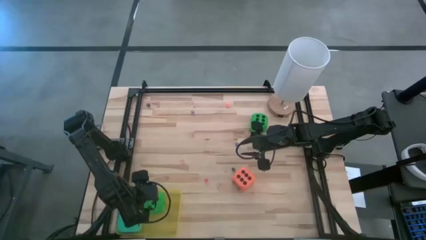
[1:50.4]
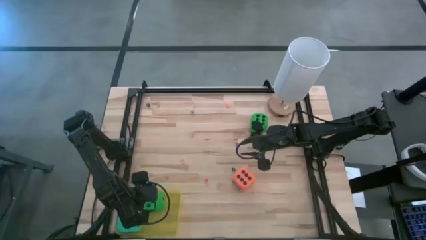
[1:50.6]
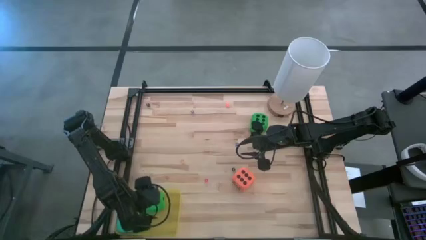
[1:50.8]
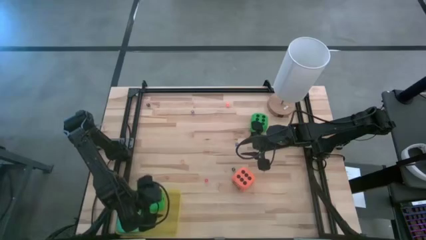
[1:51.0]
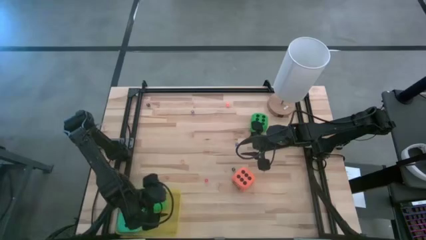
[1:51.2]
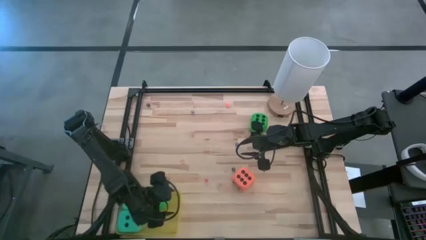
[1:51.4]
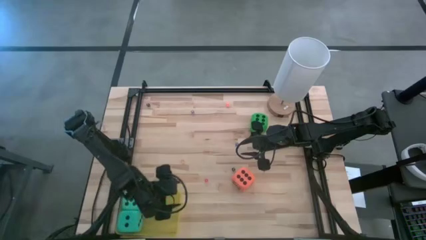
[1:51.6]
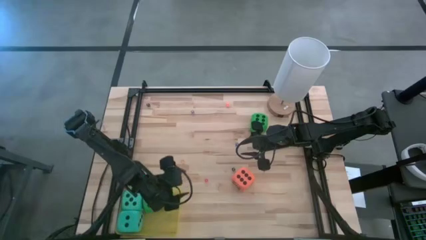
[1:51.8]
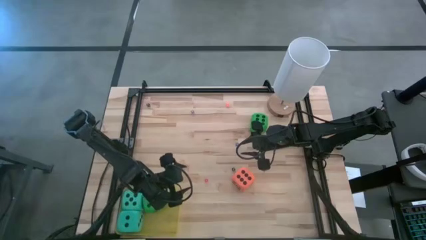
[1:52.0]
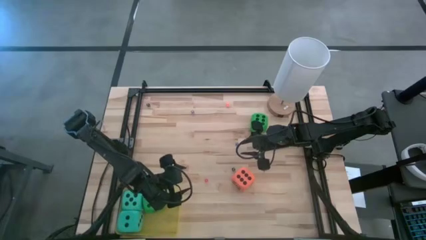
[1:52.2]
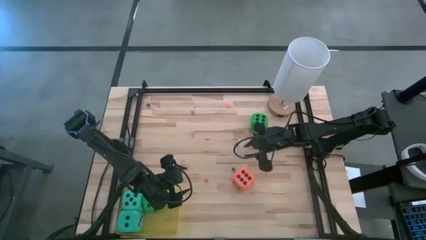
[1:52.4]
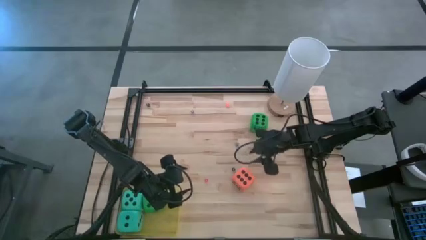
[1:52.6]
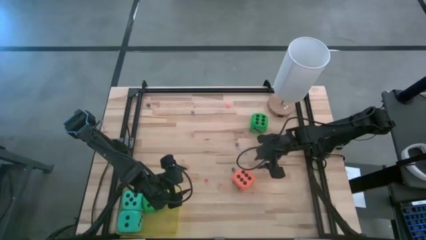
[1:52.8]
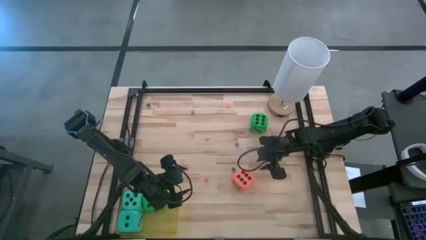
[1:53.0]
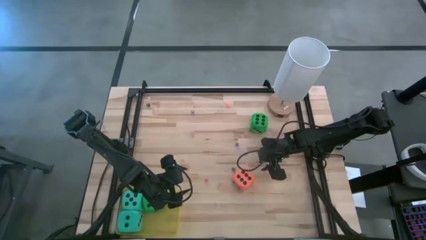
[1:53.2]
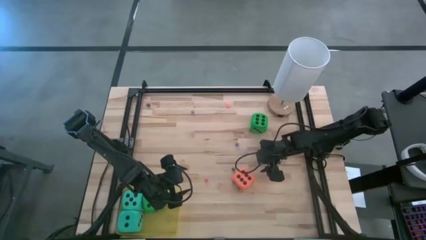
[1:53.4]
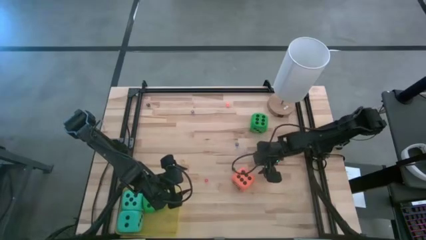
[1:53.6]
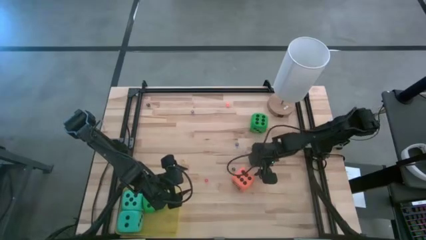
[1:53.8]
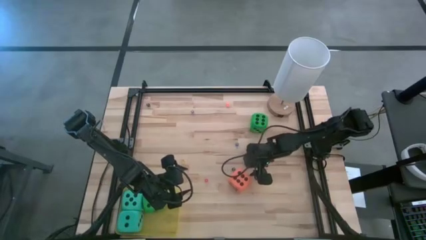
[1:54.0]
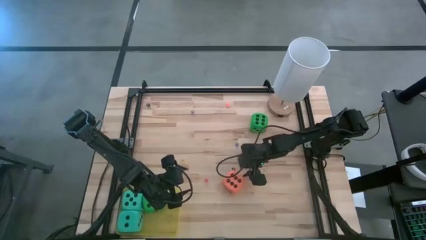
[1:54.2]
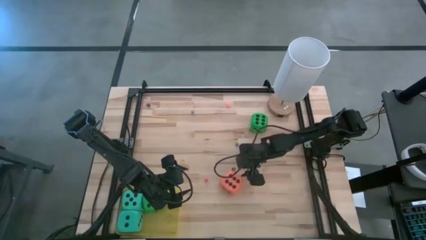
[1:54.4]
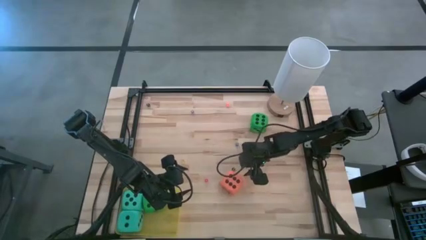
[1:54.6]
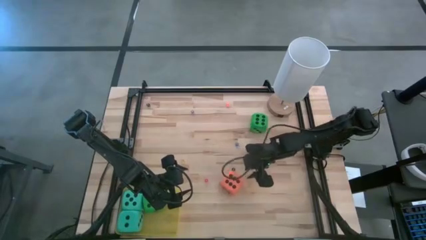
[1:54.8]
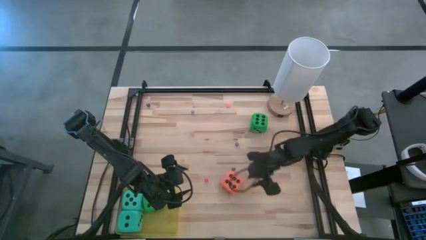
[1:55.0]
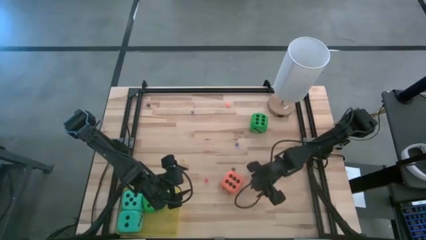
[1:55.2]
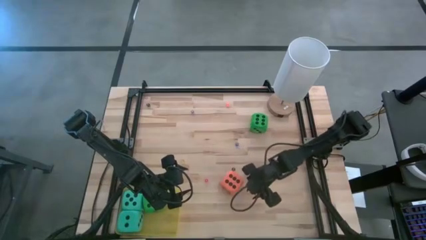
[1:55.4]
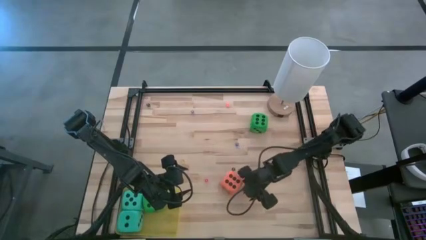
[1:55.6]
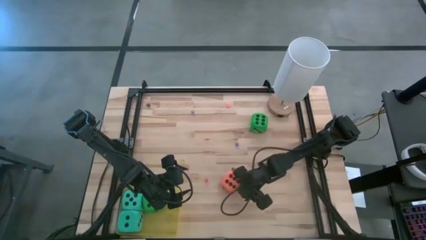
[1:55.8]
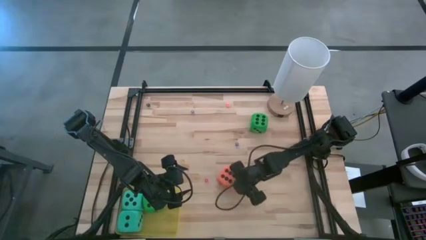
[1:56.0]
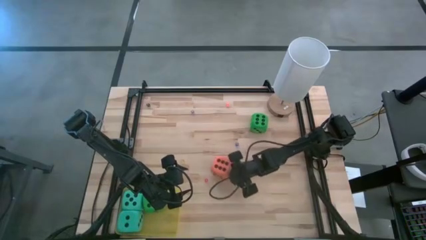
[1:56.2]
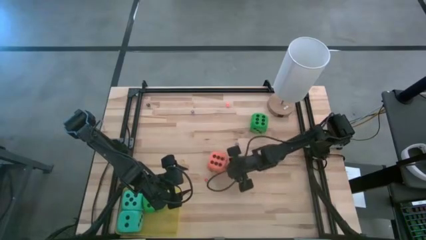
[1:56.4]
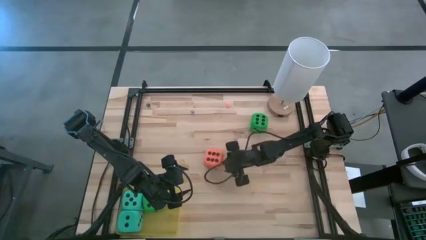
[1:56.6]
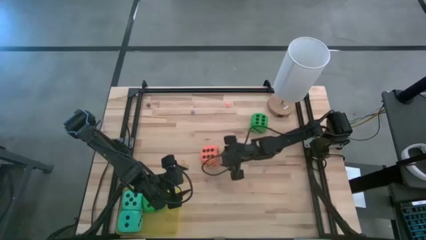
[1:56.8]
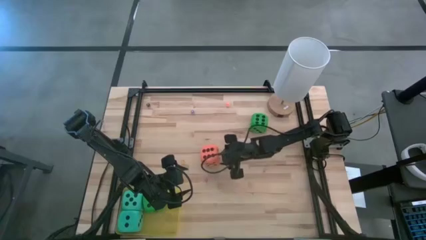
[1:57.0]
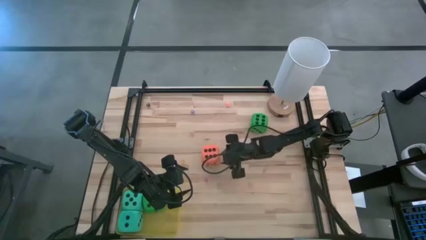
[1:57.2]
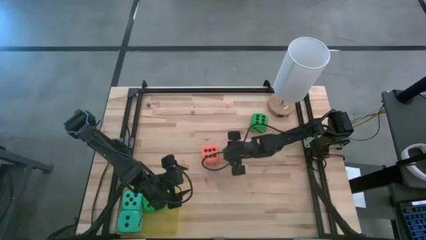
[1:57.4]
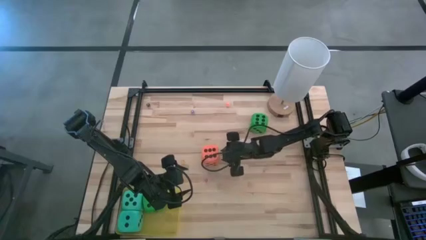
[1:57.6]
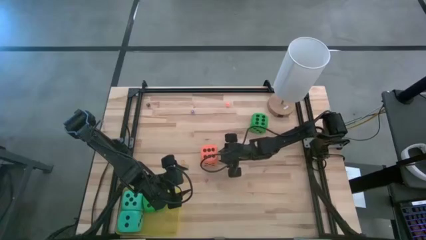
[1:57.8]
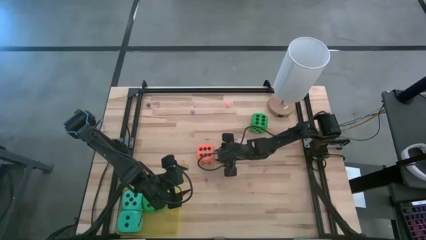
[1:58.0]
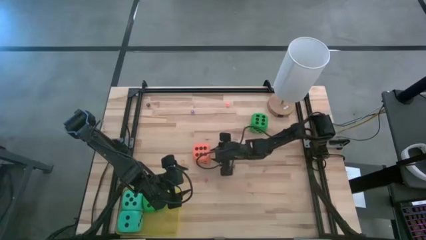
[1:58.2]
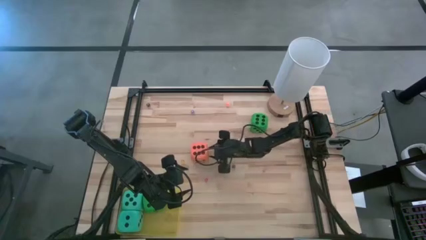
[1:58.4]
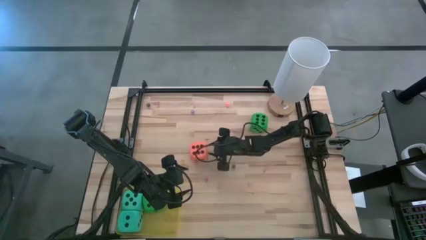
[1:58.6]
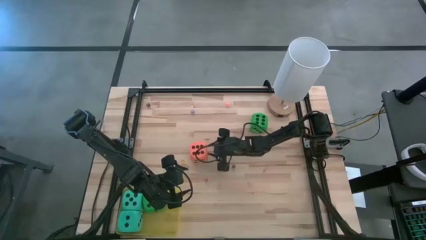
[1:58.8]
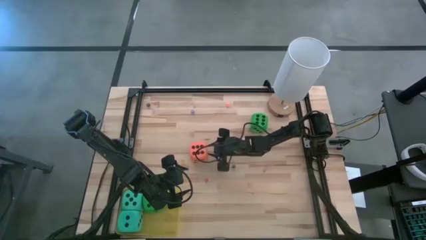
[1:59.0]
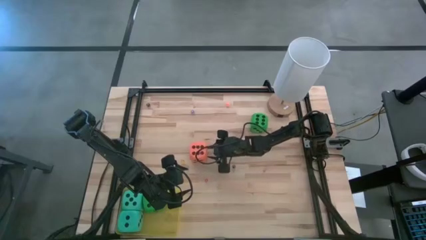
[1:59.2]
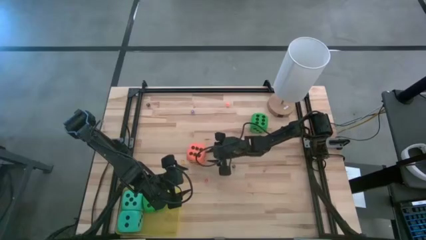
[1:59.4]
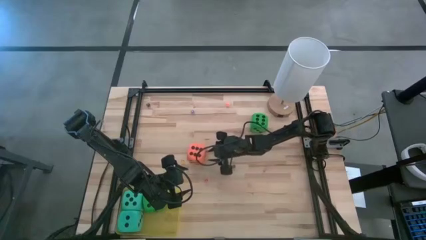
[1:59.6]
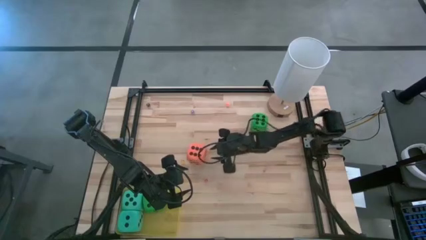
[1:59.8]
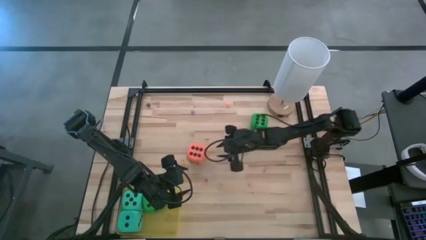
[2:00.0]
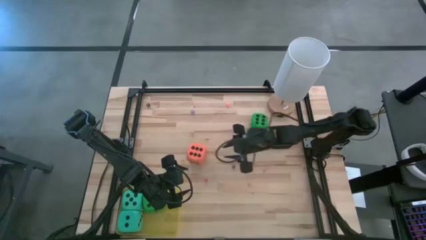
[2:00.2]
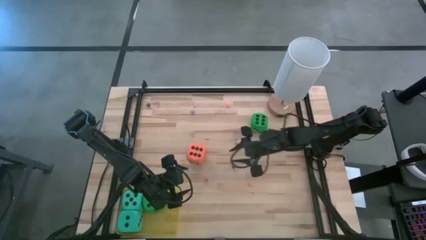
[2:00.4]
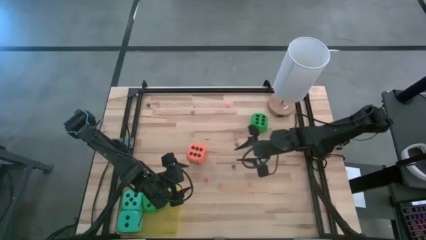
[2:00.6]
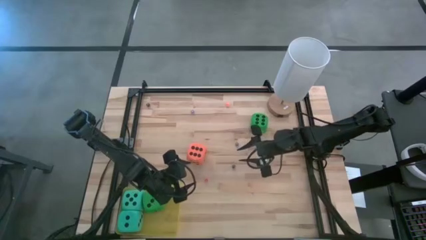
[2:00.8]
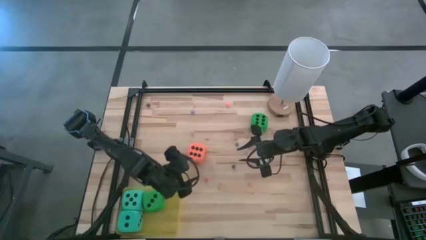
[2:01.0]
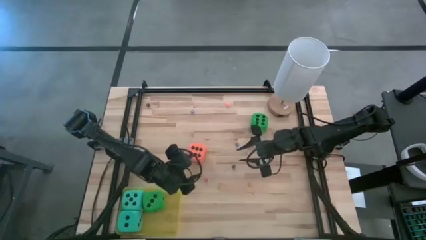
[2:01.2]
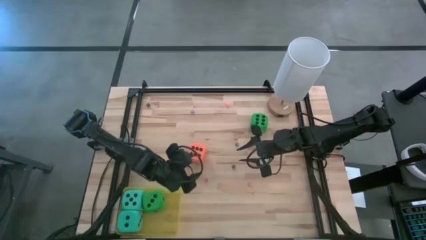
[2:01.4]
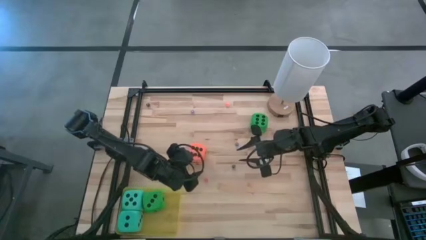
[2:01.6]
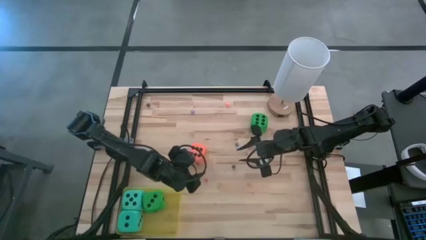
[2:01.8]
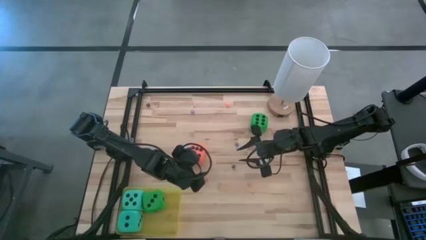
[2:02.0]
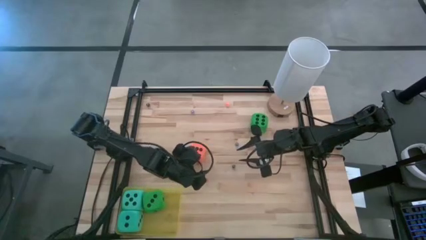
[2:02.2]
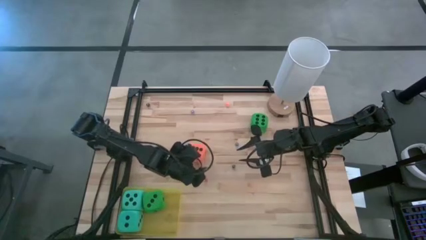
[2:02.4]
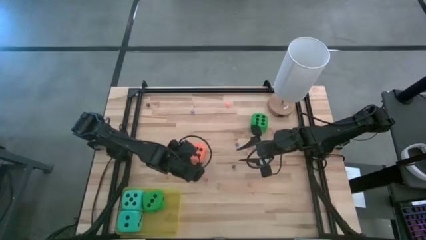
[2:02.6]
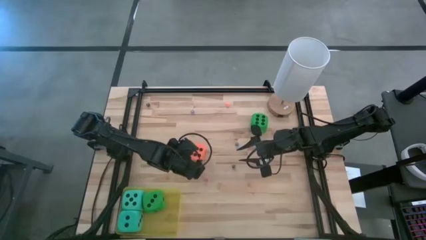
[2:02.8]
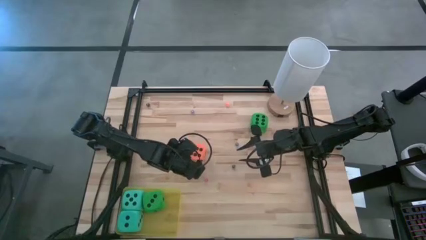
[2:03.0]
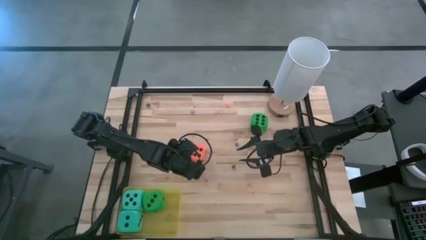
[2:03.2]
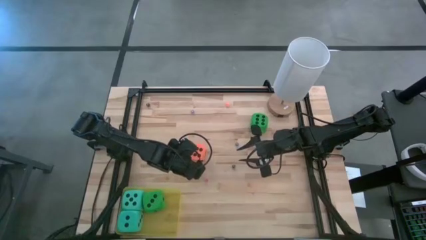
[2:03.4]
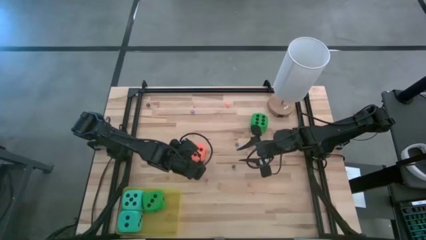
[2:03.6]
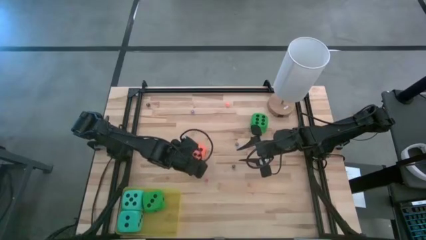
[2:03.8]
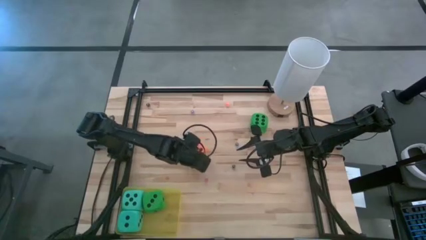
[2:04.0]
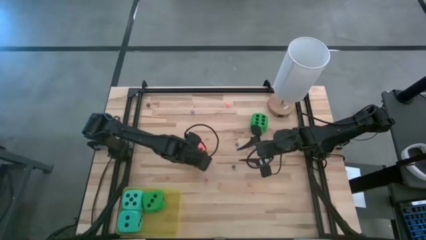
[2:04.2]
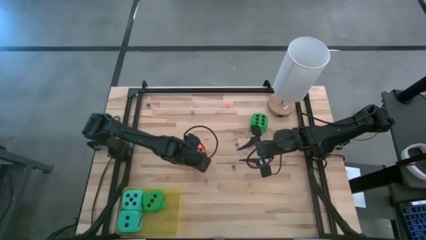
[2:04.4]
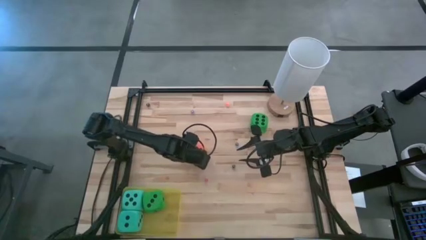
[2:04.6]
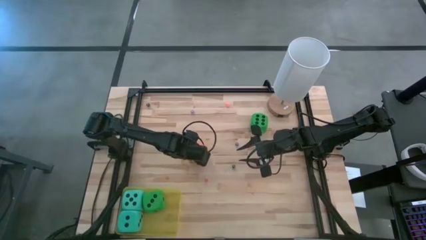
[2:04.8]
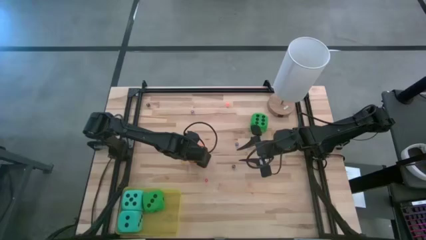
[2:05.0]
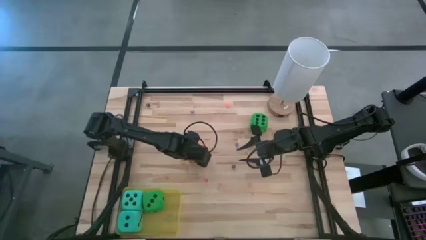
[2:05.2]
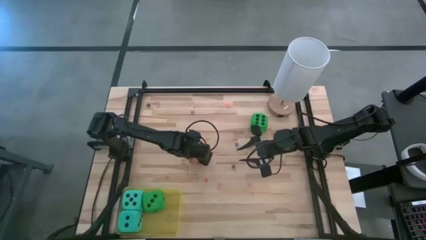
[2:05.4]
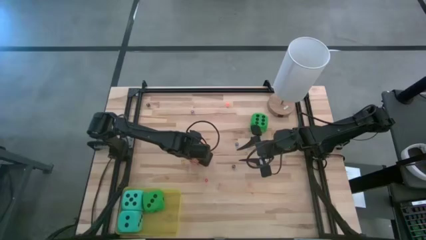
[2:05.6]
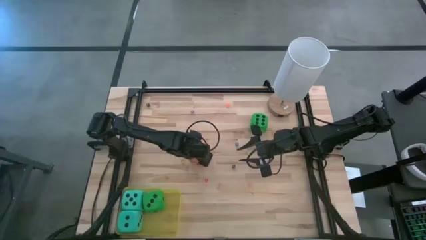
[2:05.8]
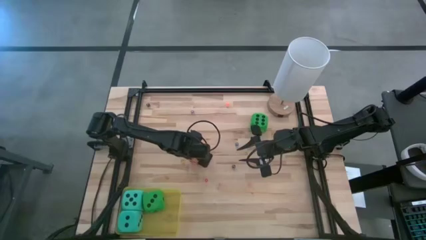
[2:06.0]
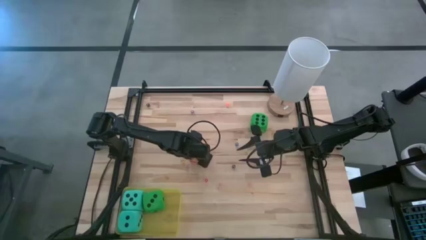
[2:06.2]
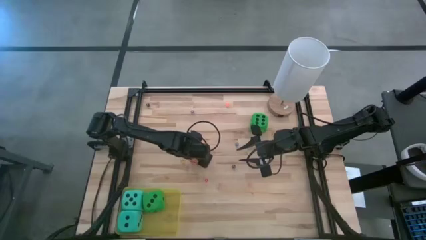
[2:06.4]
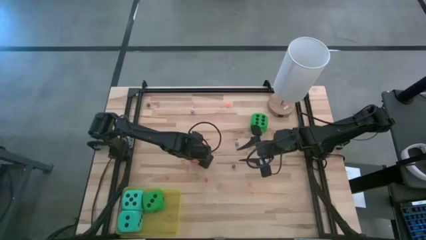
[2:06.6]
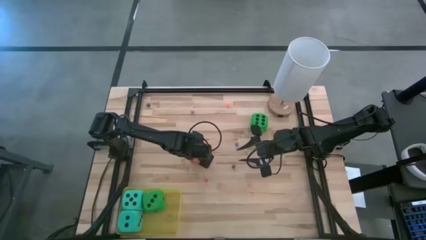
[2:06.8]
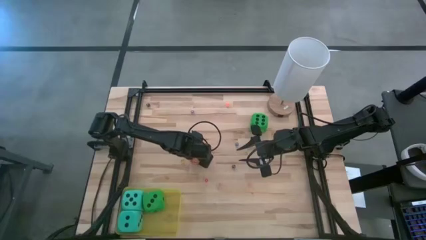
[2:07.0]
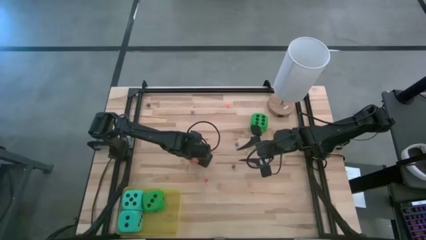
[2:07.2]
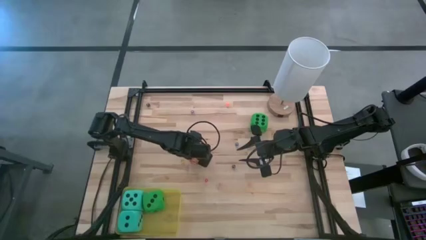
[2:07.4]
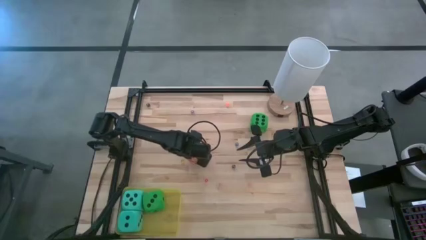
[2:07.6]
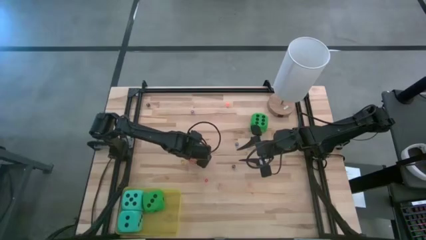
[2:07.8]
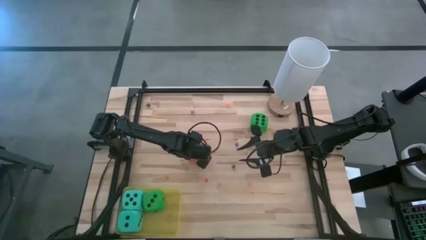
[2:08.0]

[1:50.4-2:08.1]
Task: Pick & Place Dice
Put the large orange dice into the yellow bin
